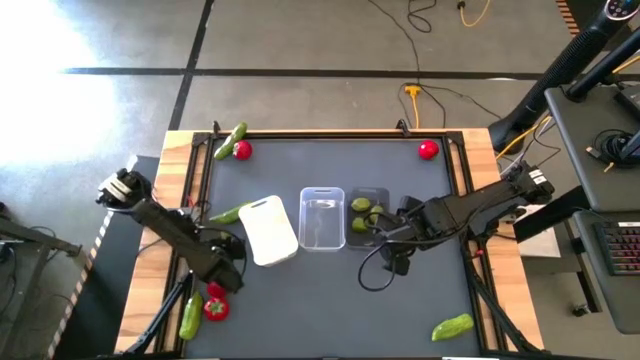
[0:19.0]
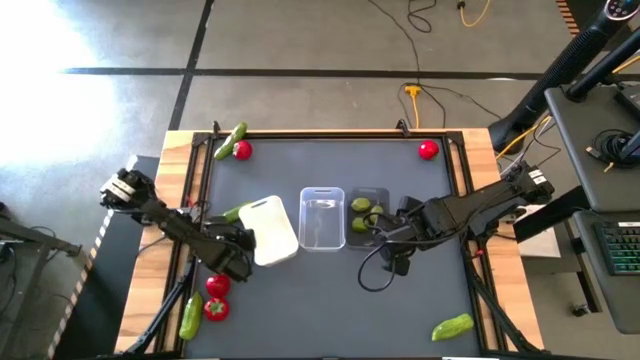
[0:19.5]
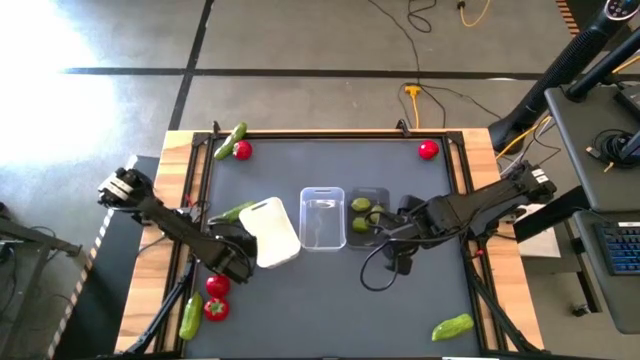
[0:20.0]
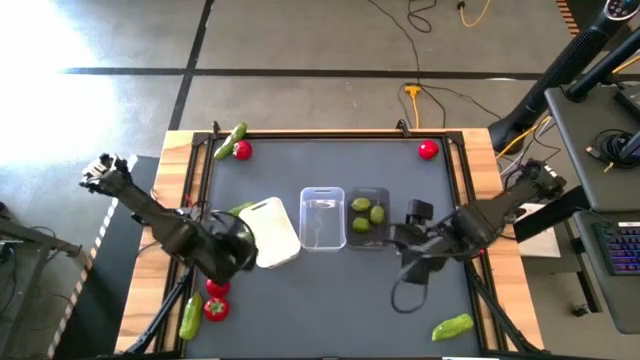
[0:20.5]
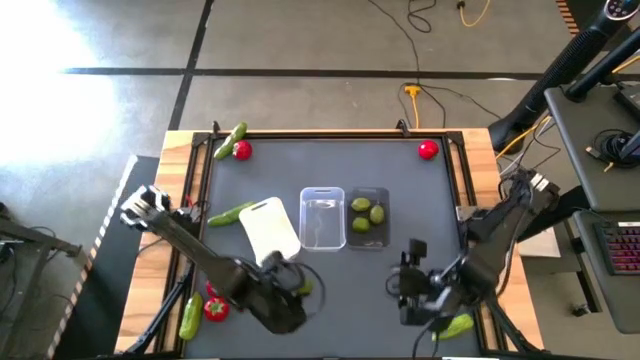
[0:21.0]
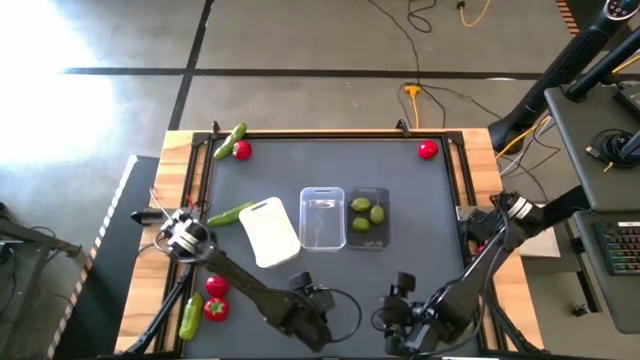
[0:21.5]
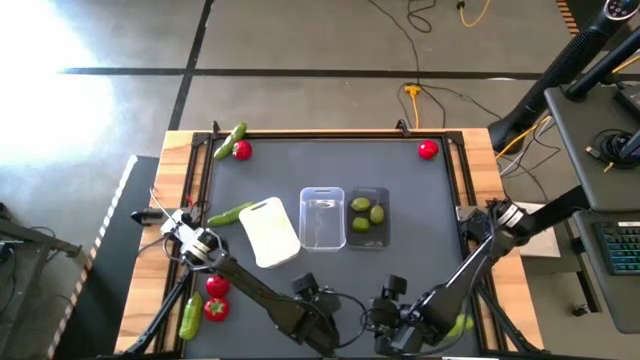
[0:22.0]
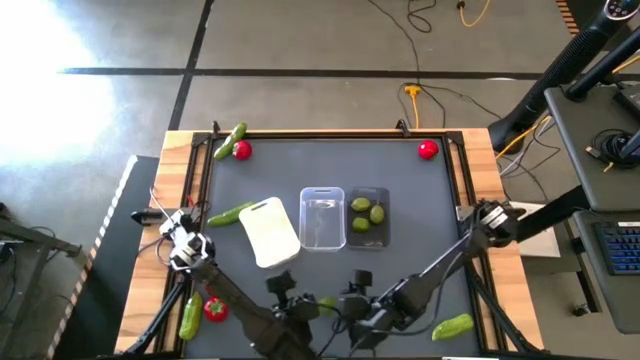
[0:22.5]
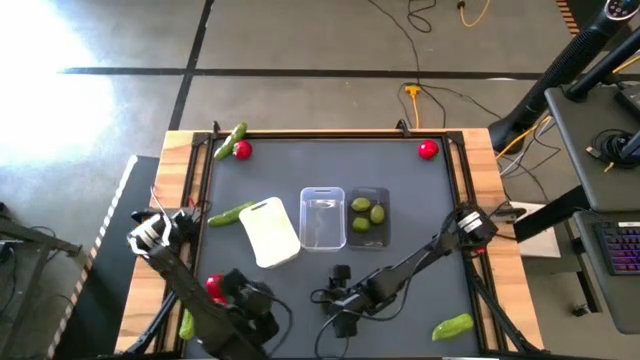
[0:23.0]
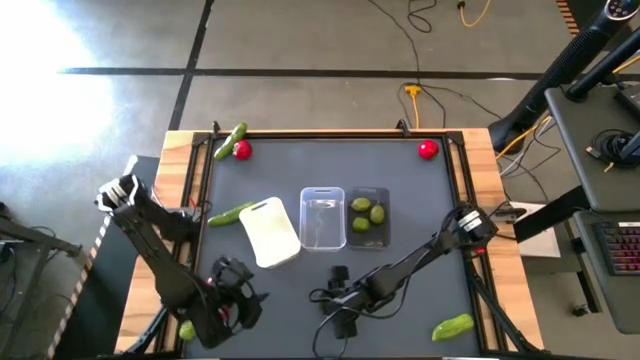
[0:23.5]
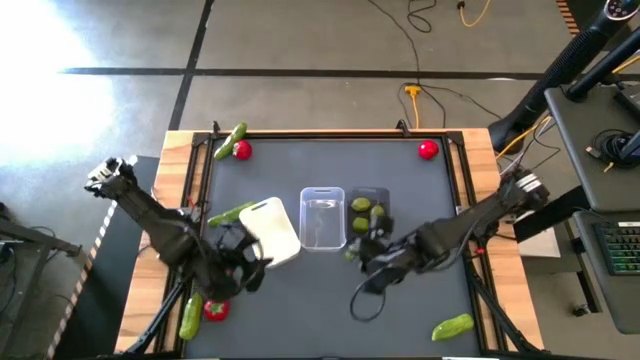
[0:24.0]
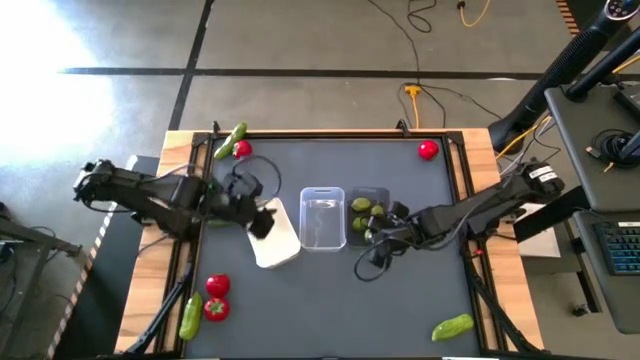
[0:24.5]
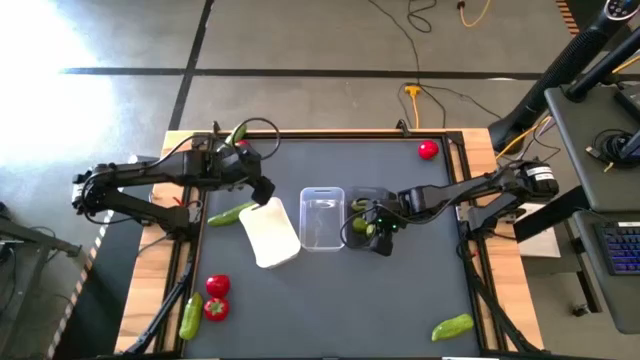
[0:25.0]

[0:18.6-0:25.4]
Task: Sort produce into baskets
Put the green lime into the black bin

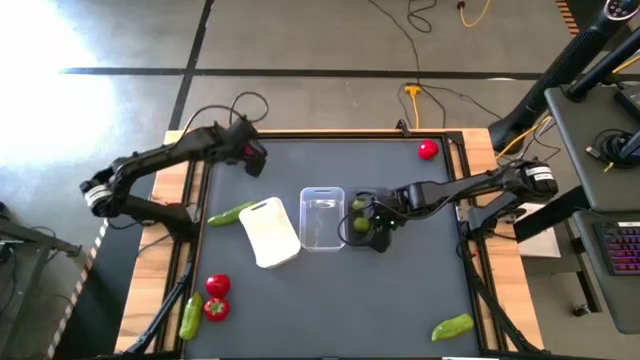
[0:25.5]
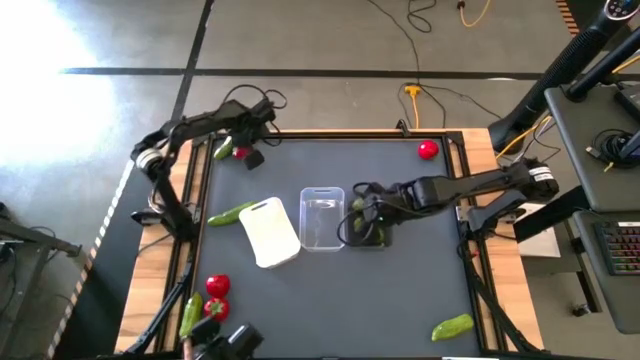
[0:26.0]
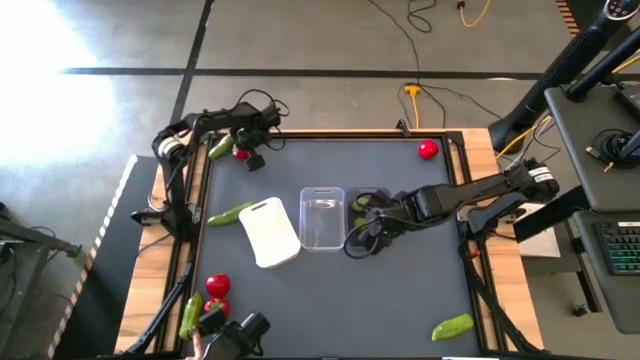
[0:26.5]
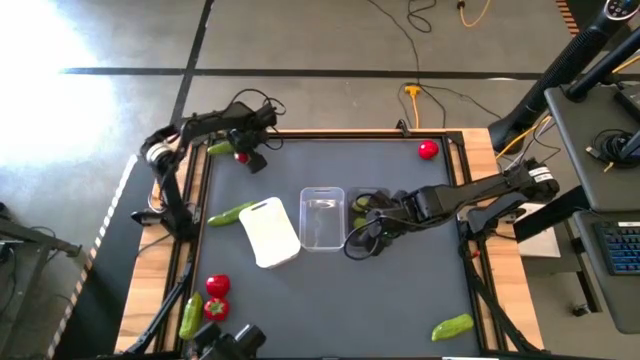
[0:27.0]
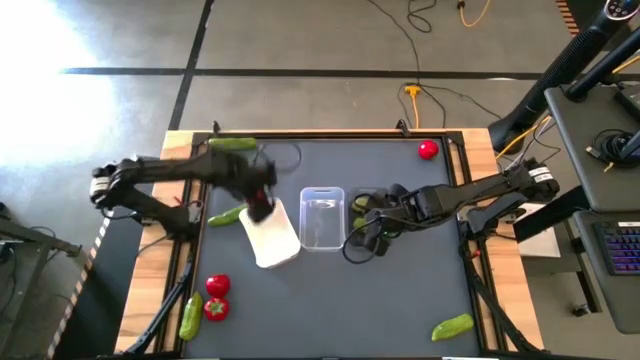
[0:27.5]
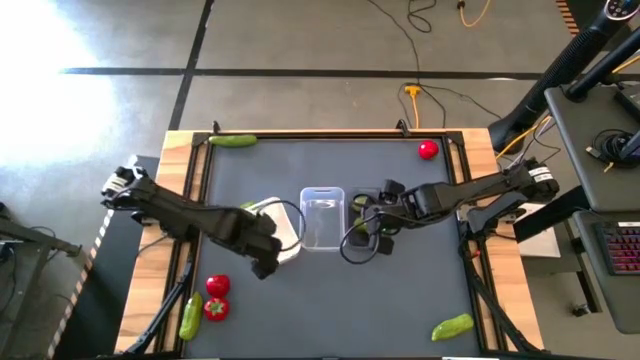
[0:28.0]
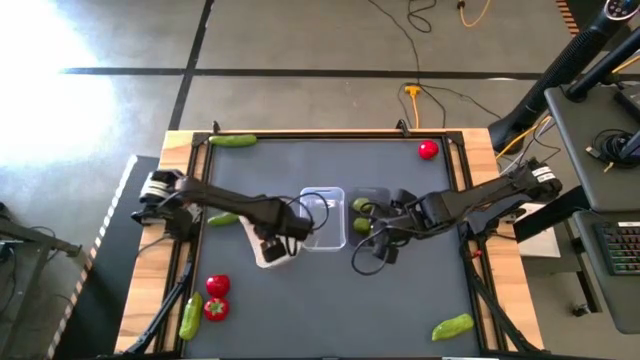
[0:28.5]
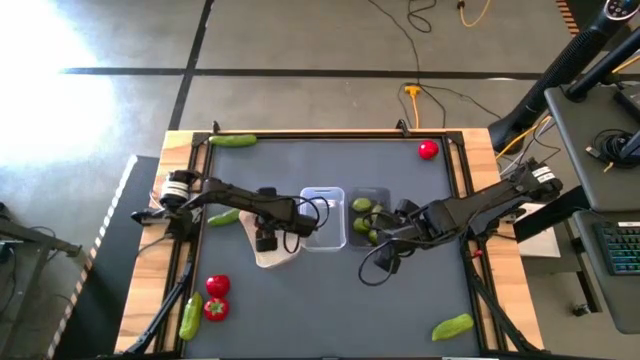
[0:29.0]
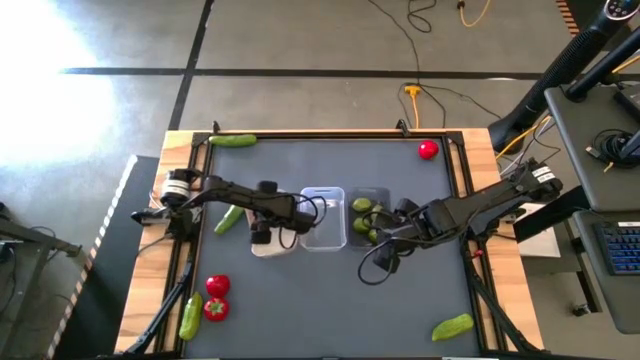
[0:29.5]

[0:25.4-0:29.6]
Put the red tomato into the white bin

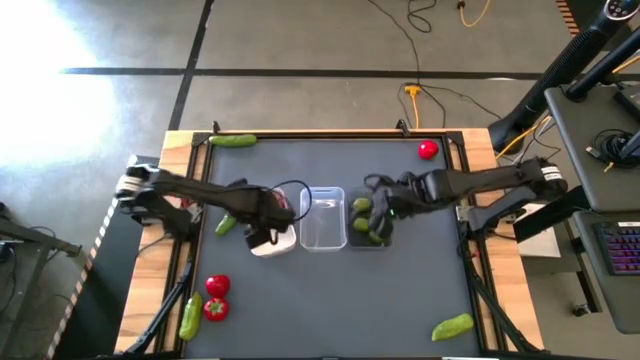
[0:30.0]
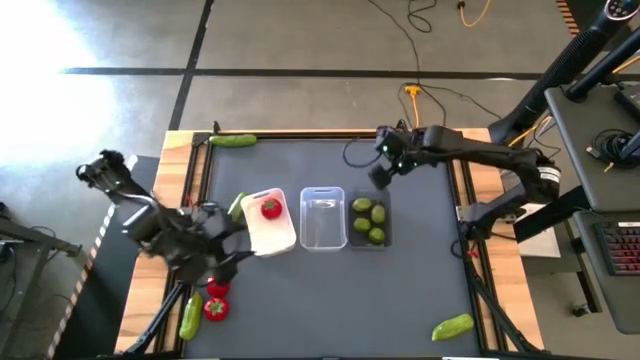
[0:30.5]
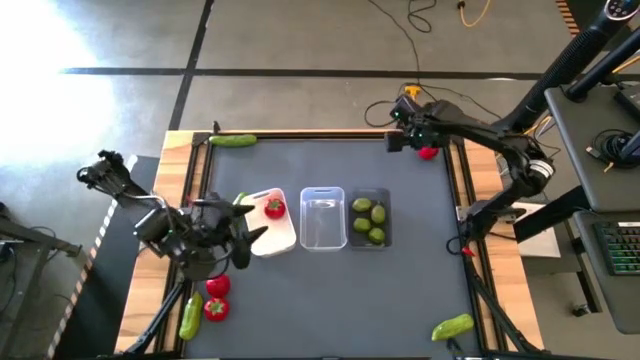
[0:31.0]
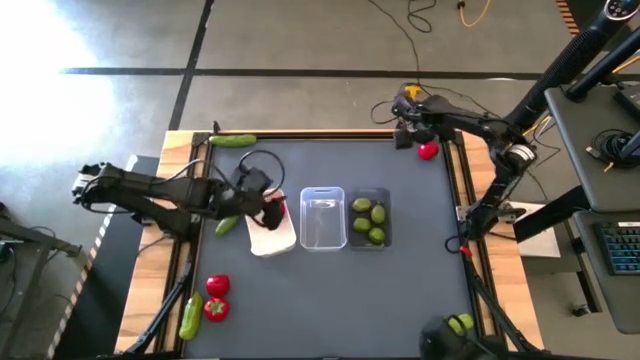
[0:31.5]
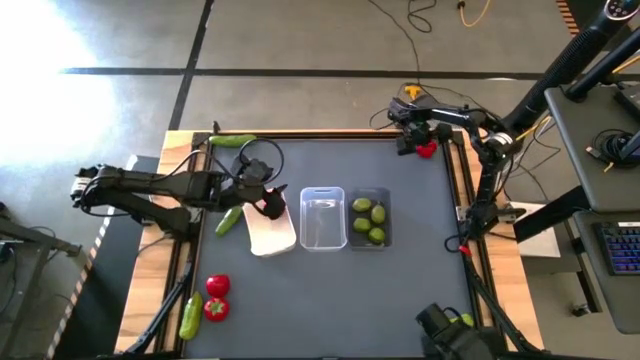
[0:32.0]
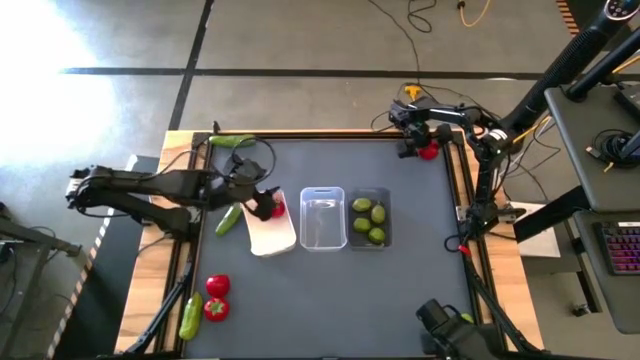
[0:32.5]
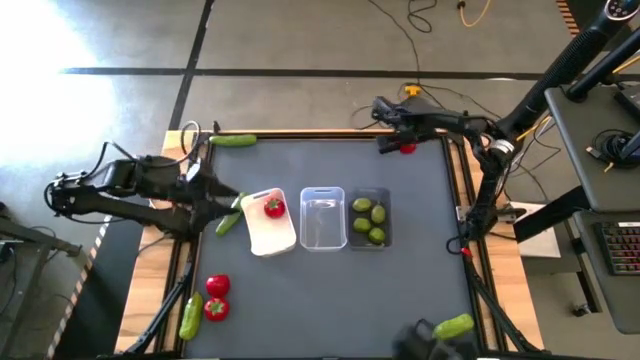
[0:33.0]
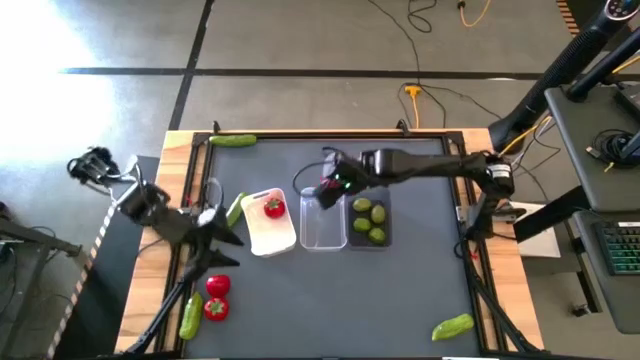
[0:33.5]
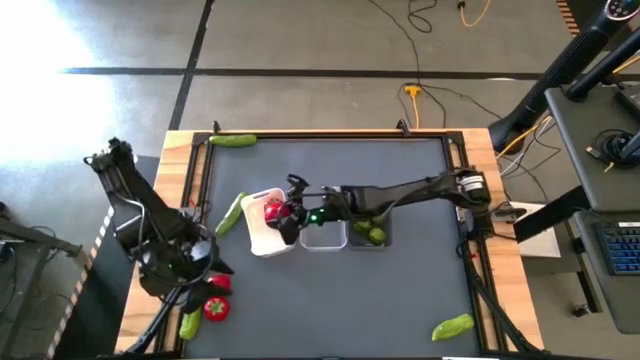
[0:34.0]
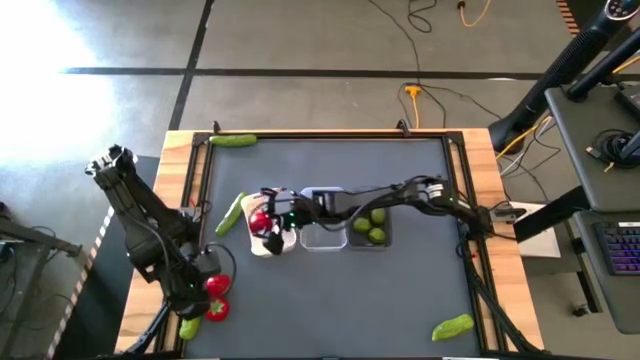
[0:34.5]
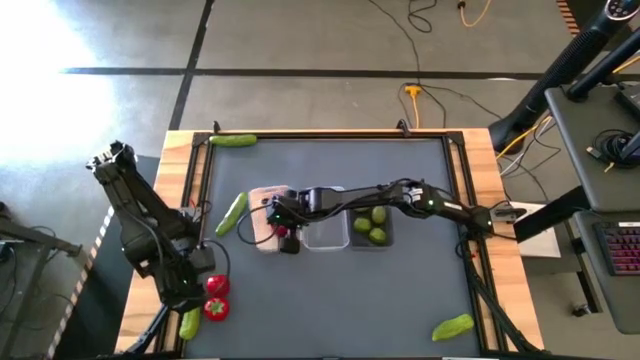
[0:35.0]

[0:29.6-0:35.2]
Put the red tomato into the white bin

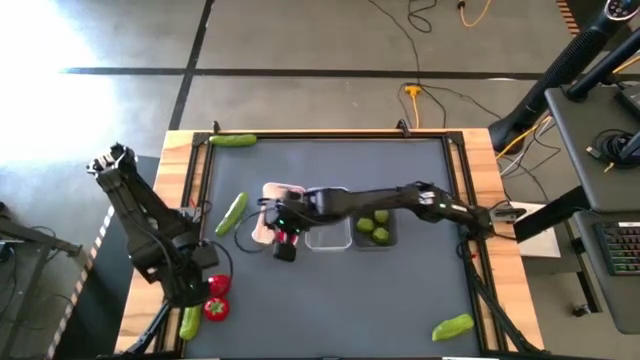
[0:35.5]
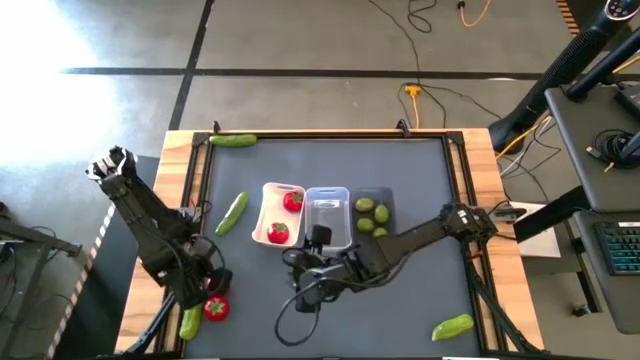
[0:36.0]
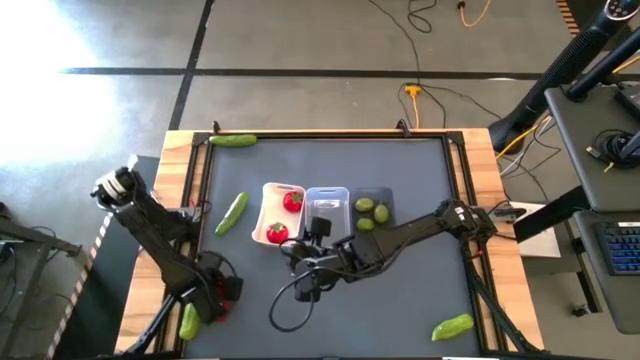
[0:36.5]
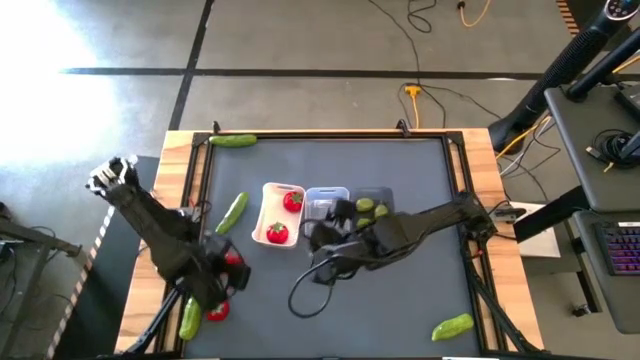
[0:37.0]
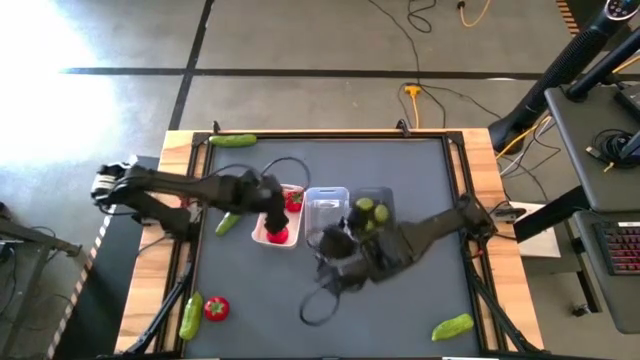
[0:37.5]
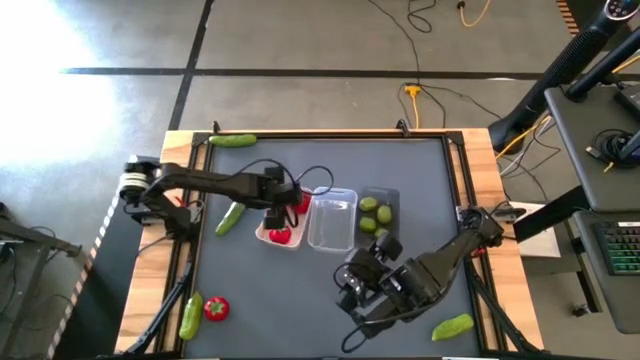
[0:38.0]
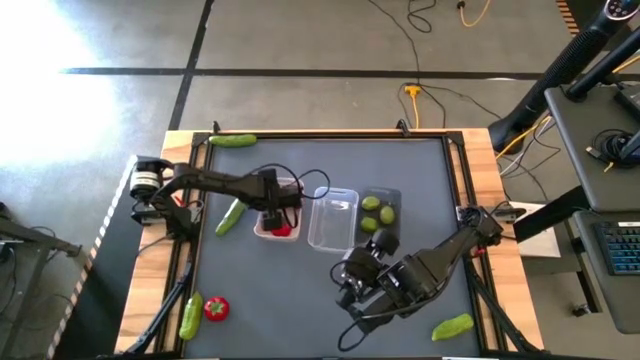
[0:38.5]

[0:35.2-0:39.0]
Put the red tomato into the white bin

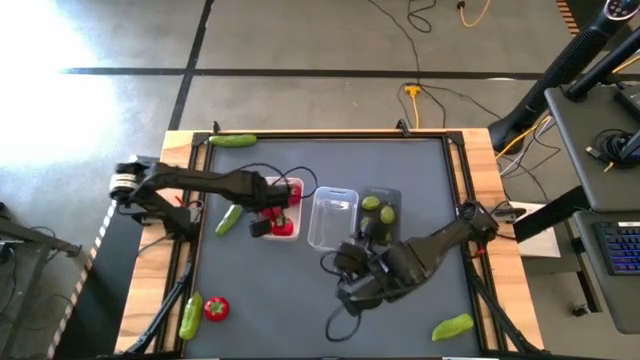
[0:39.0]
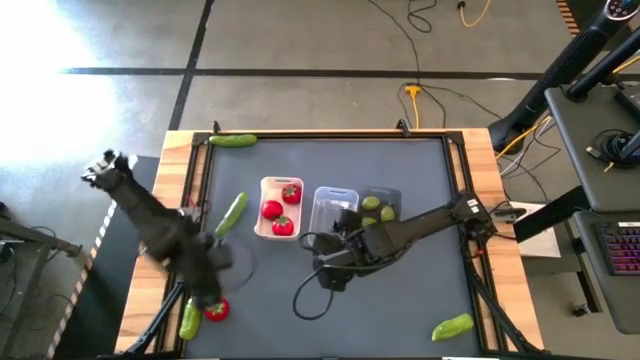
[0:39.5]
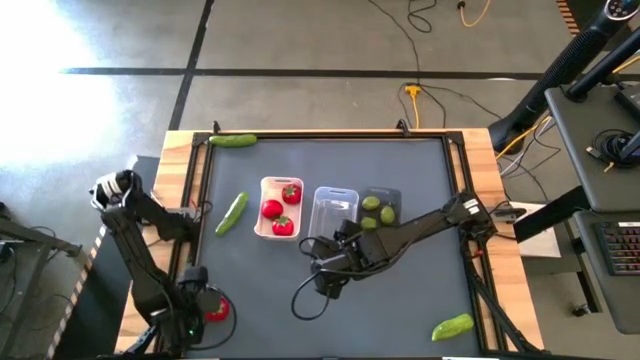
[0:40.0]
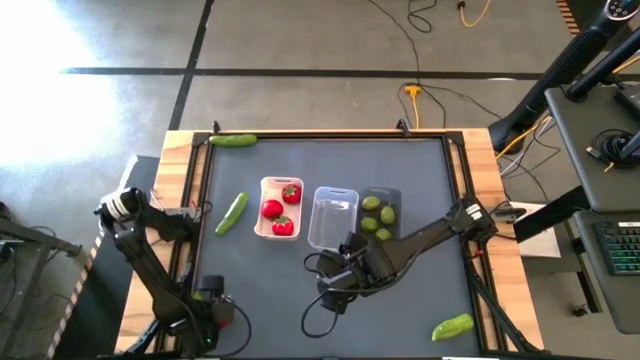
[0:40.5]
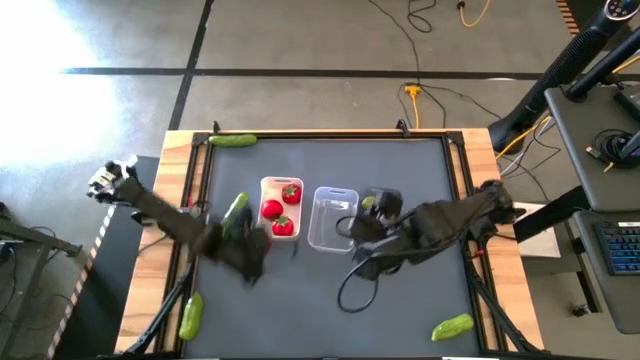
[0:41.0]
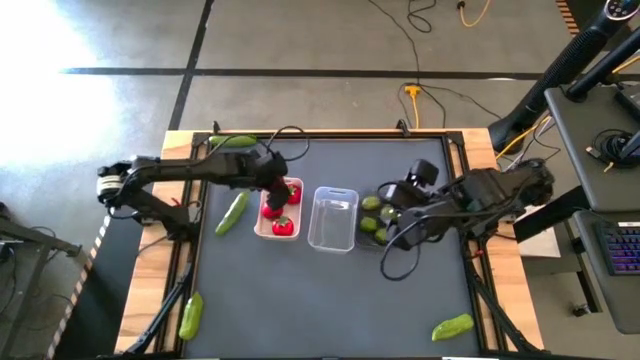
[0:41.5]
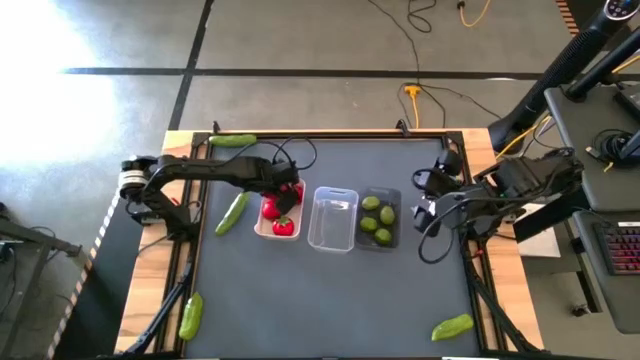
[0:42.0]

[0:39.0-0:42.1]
Put the red tomato into the white bin
